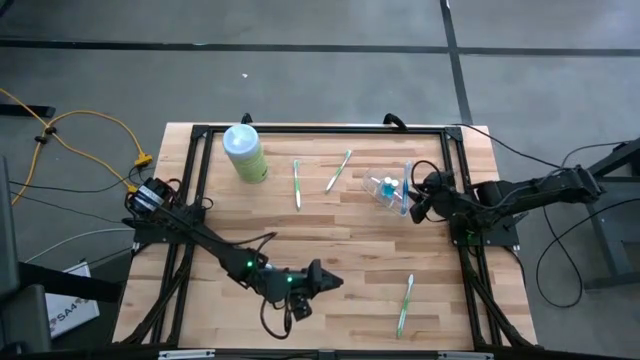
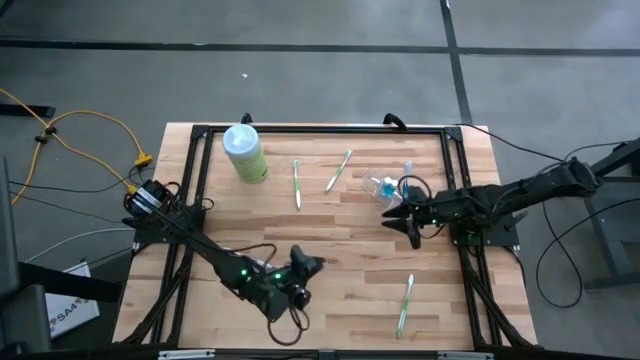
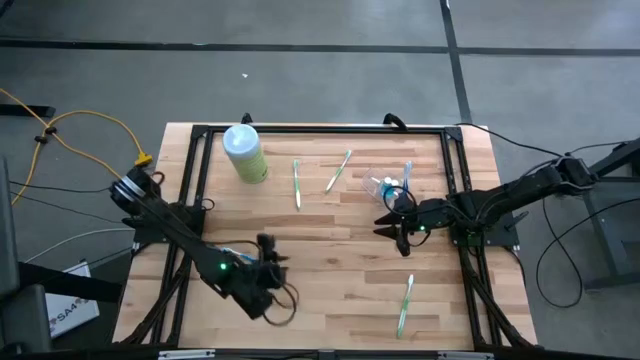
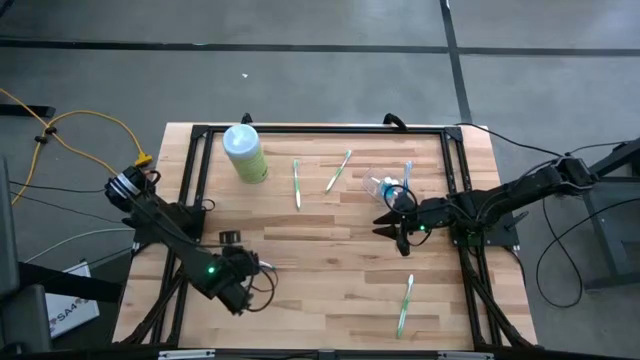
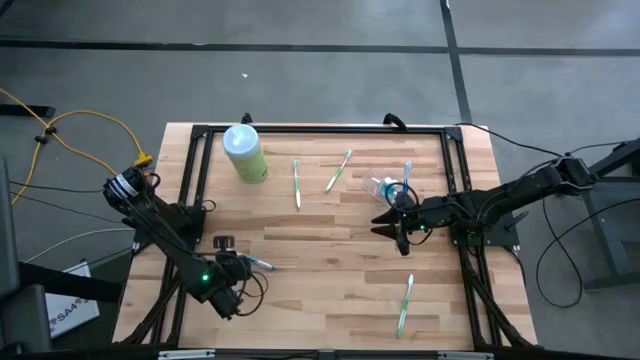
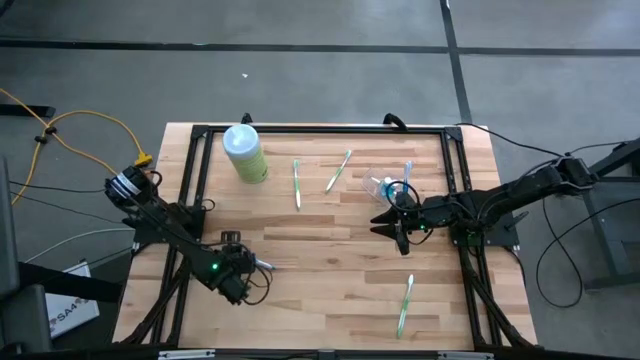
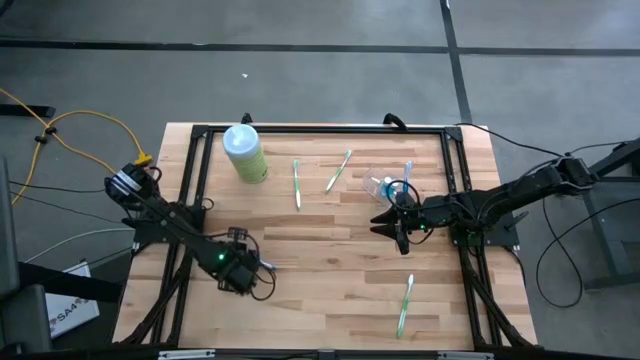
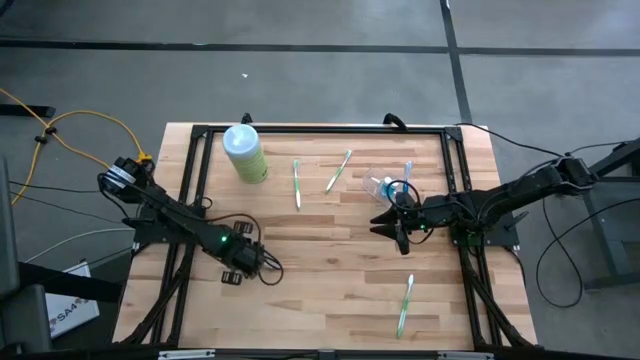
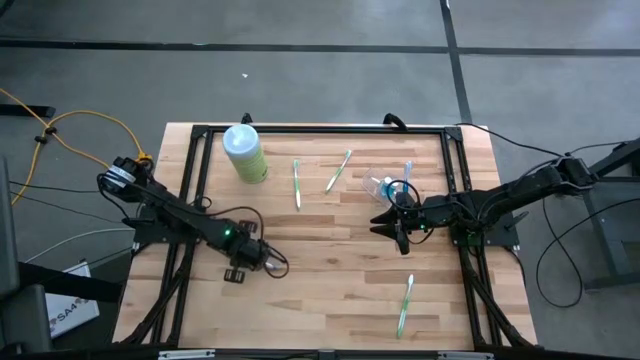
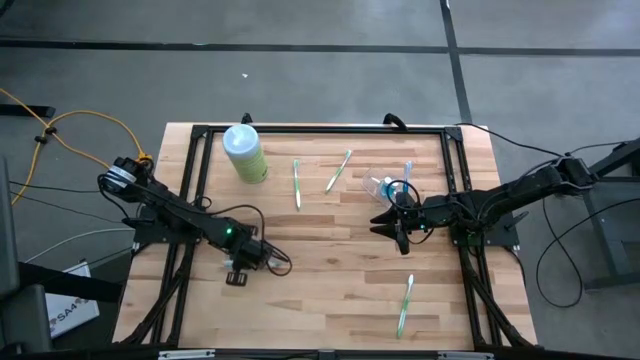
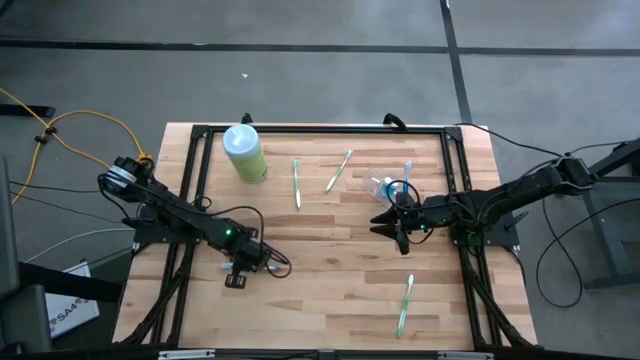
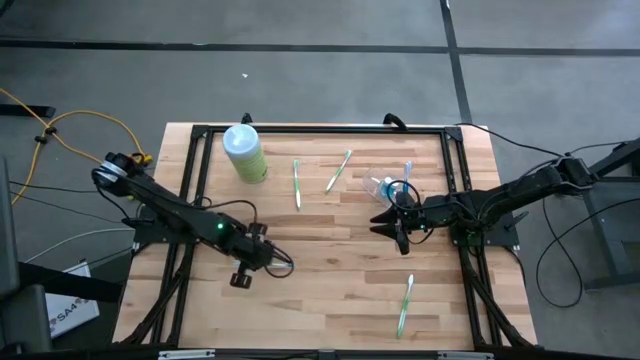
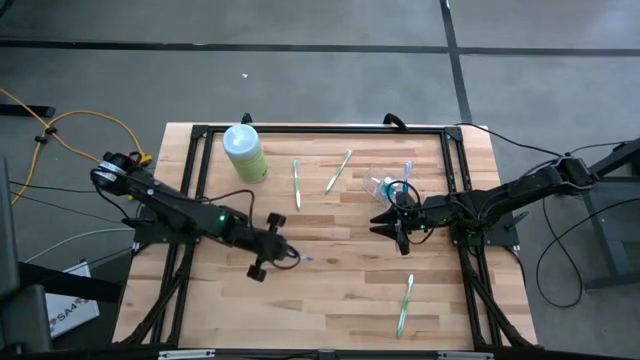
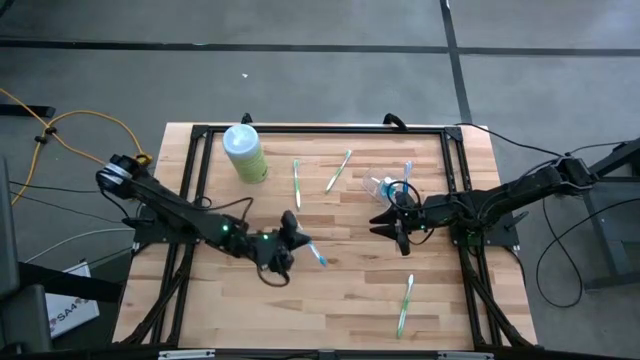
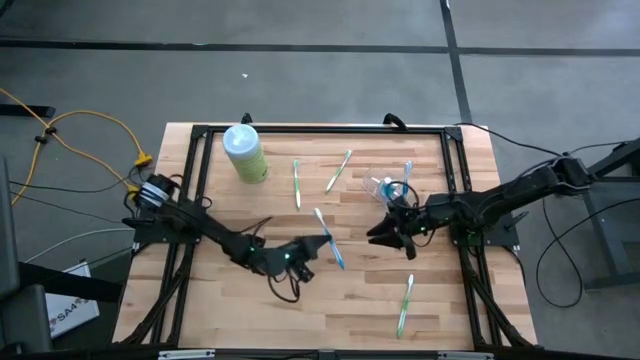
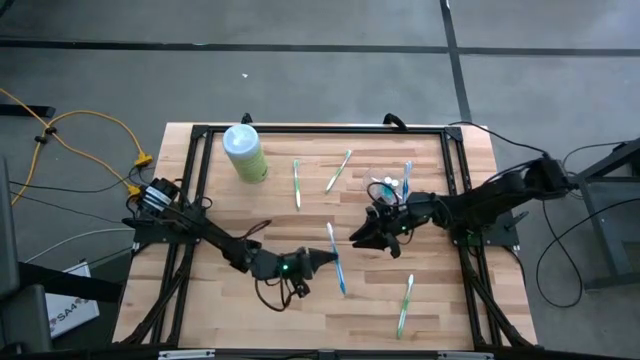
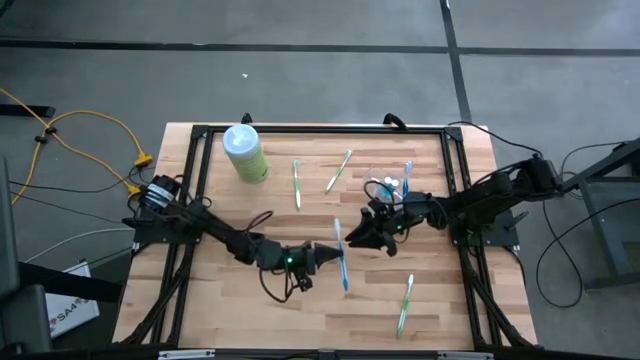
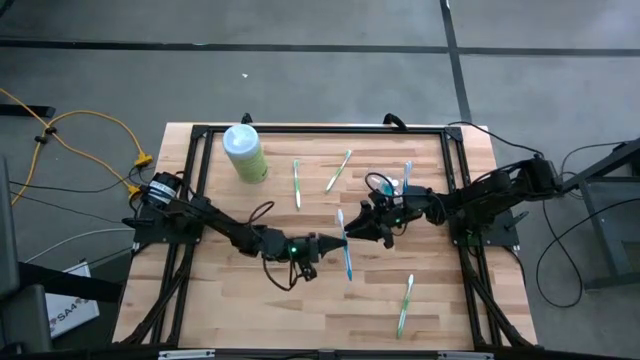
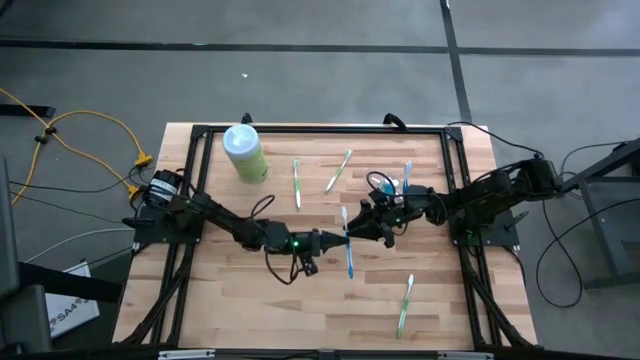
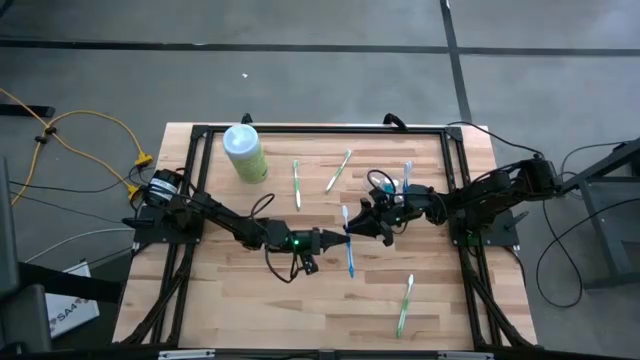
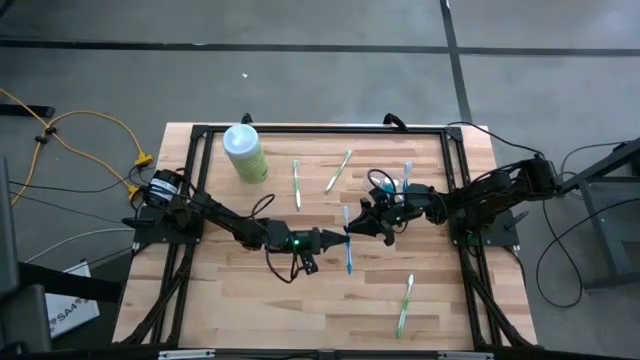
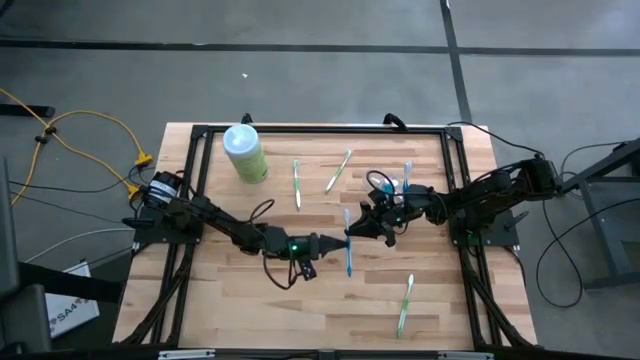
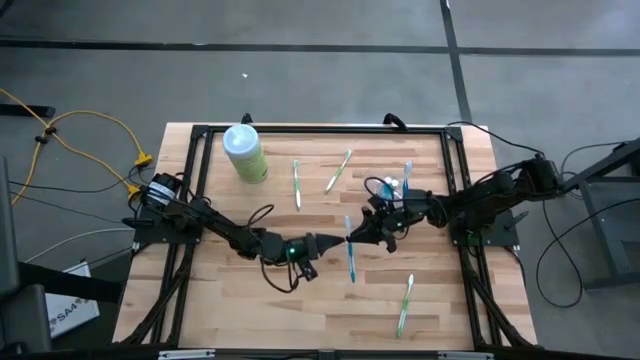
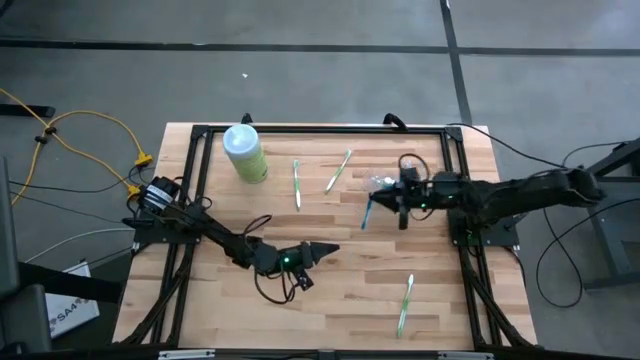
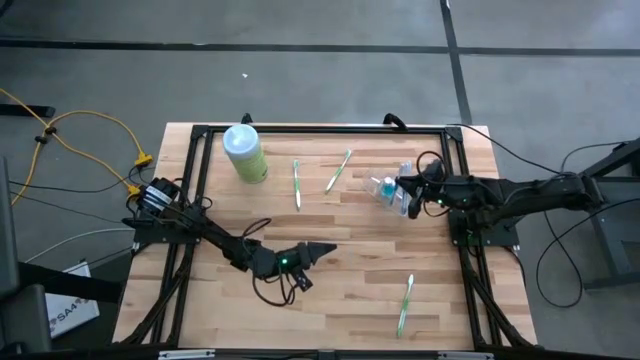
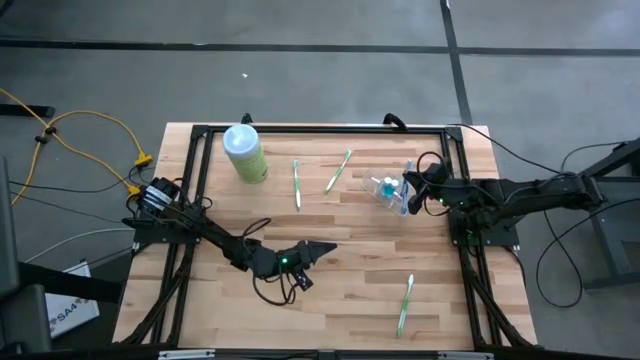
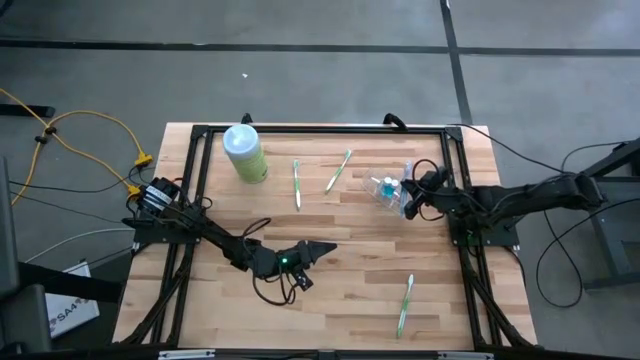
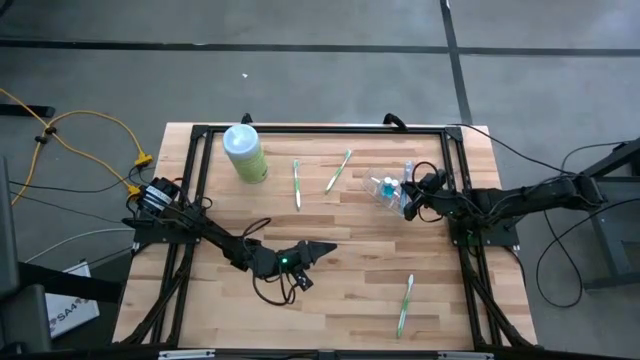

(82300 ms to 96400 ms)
Task: Pick & Place toothbrushing station
Put the blue toothbrush into the right of the transparent organizer

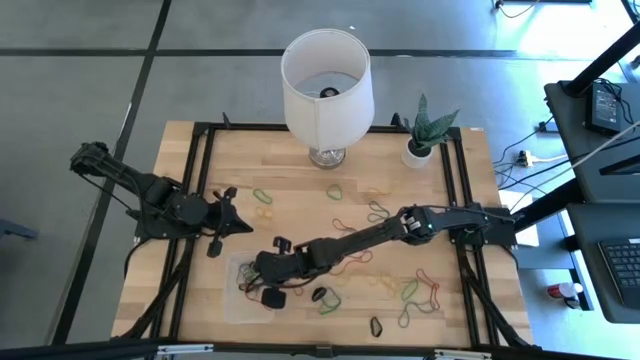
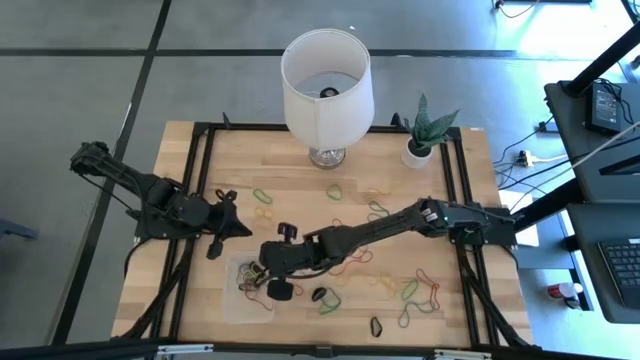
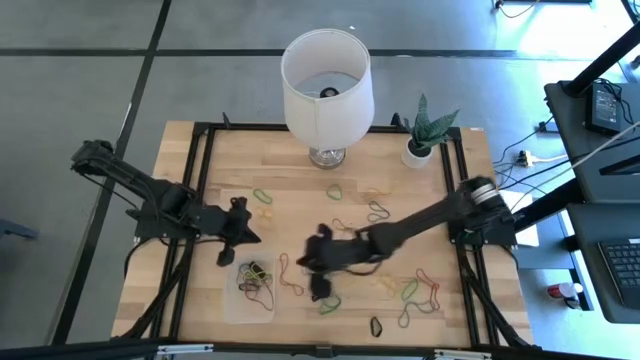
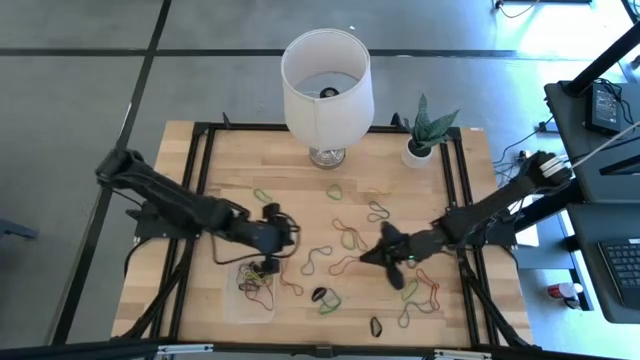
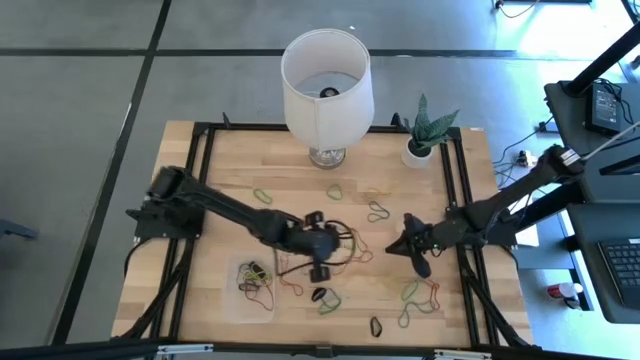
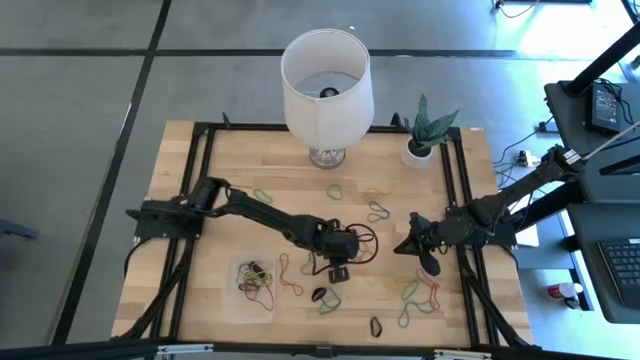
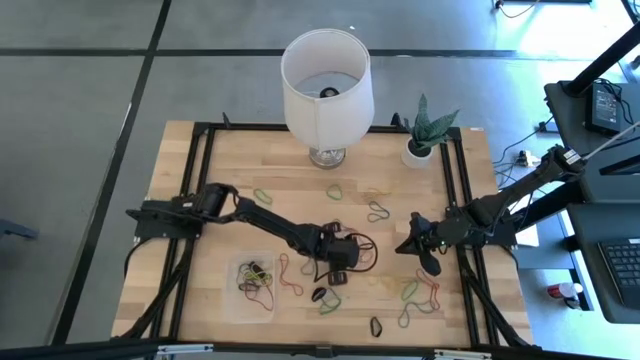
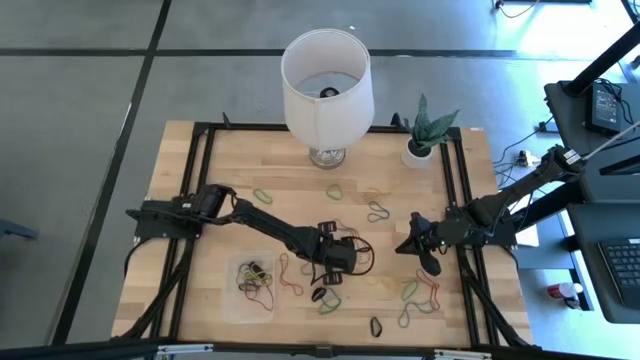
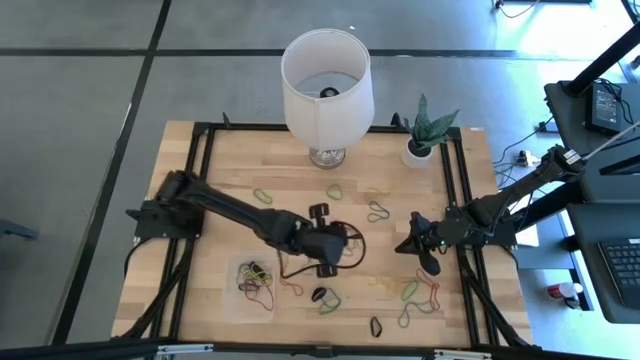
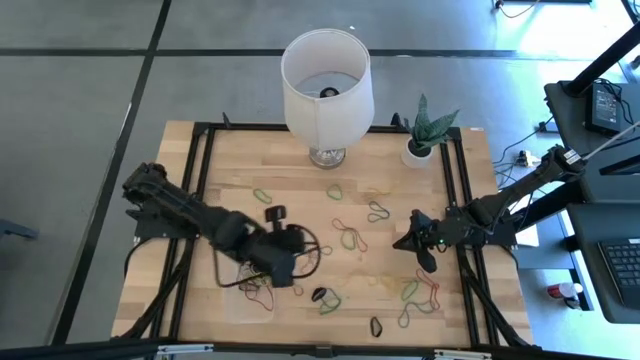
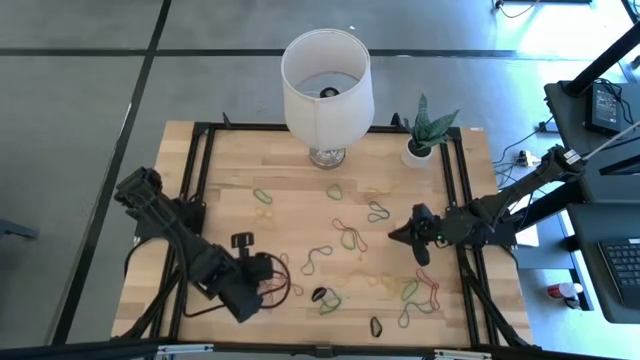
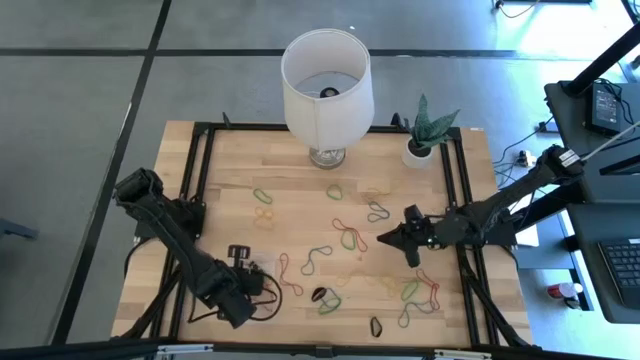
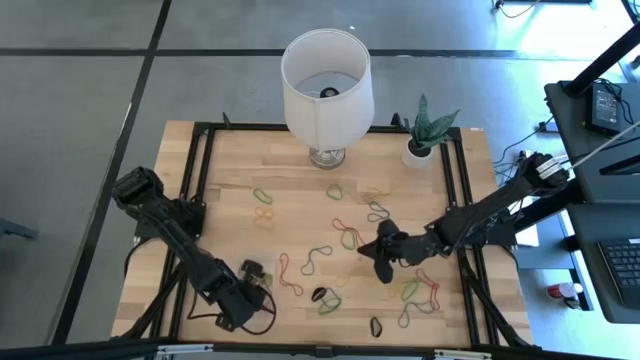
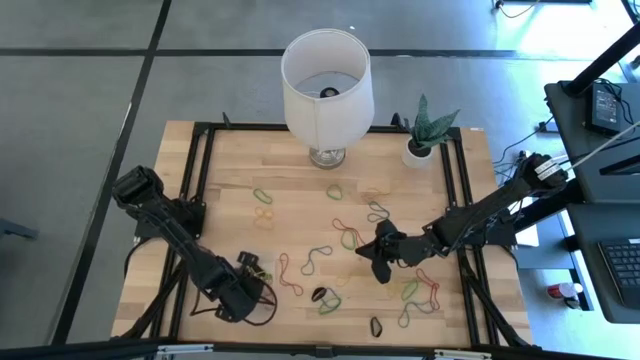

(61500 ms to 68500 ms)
Task: Pick and place rubber bands into bin
Put the red rubber band into the transparent bin
